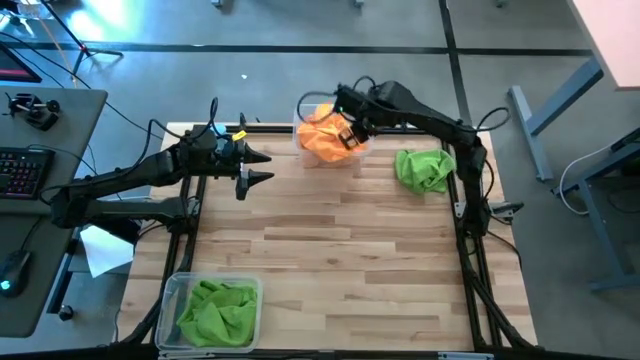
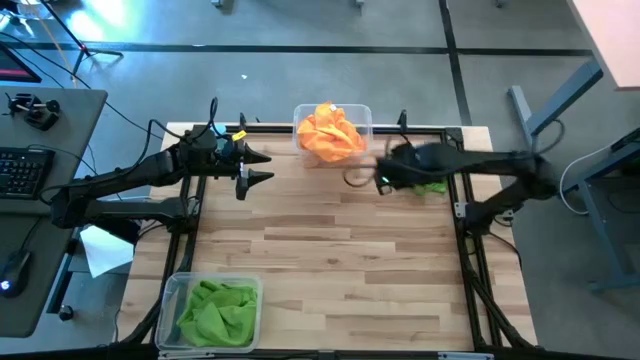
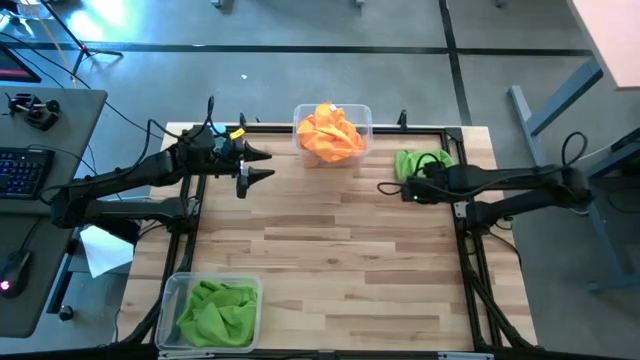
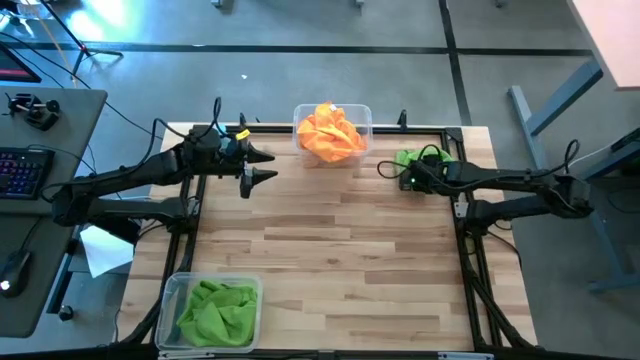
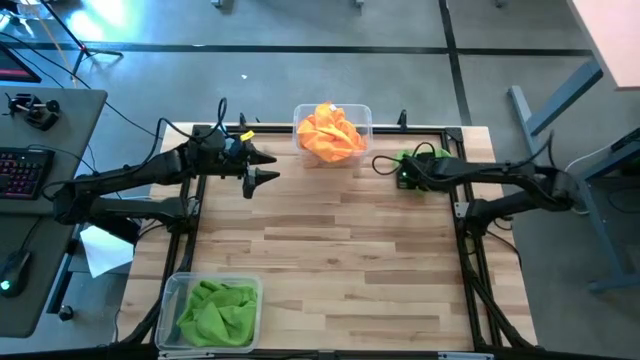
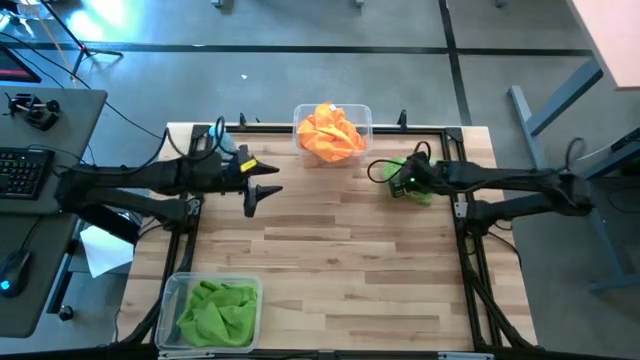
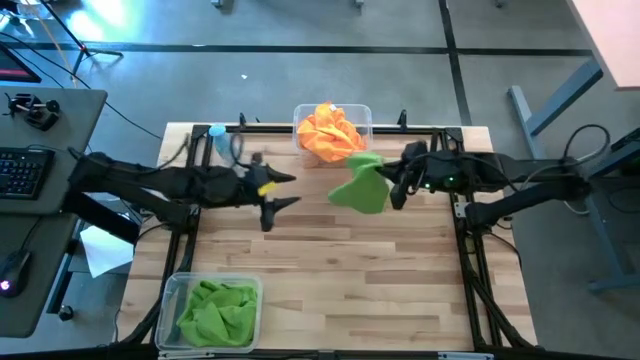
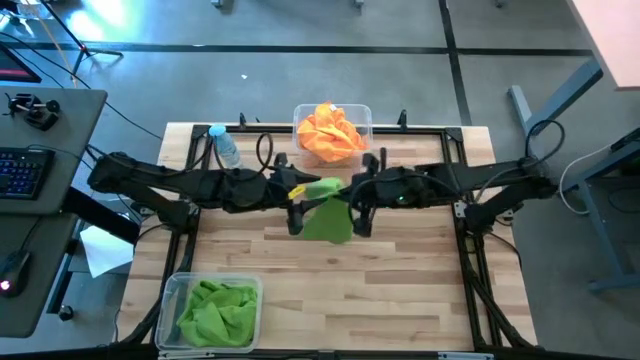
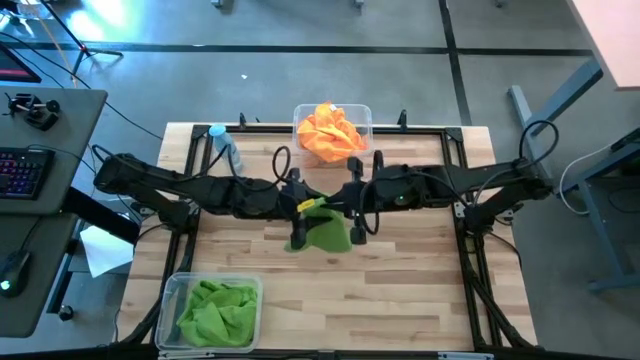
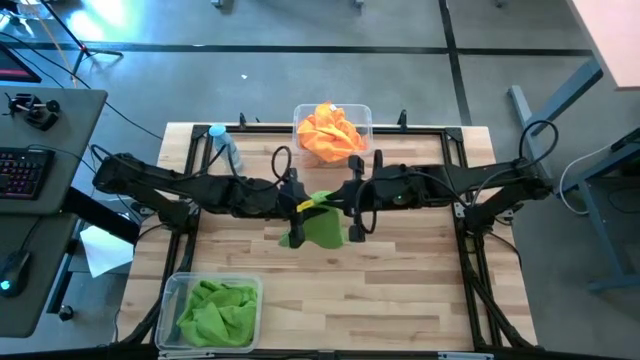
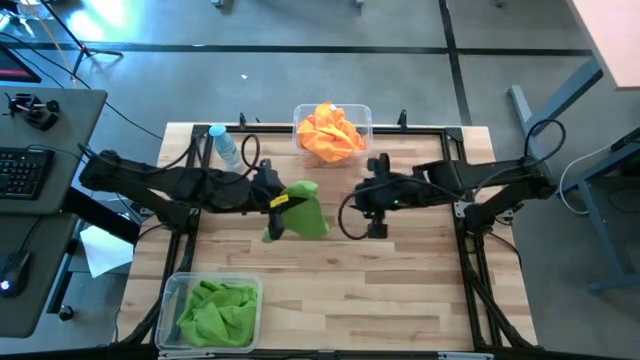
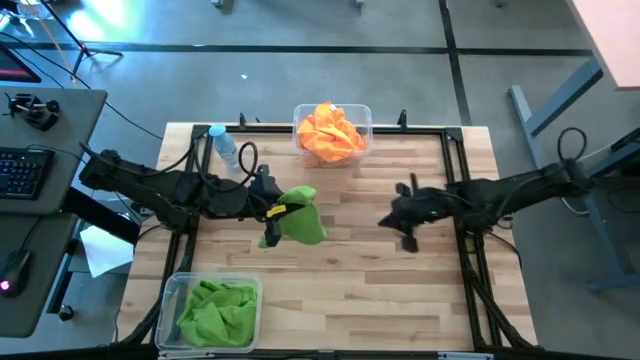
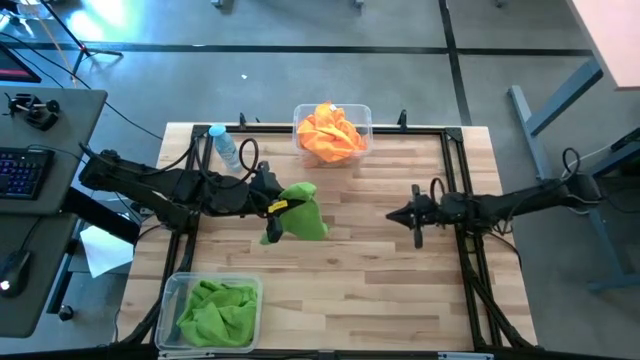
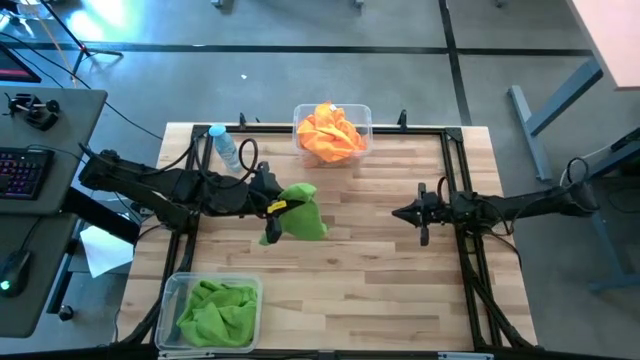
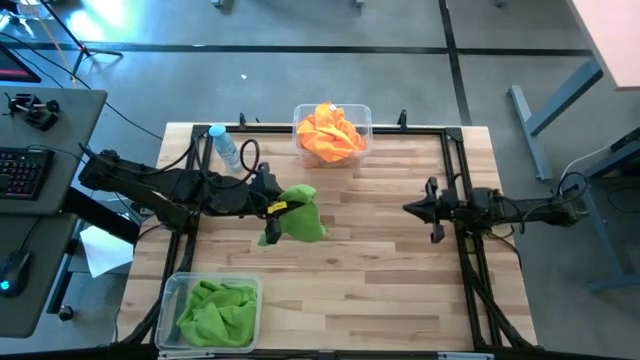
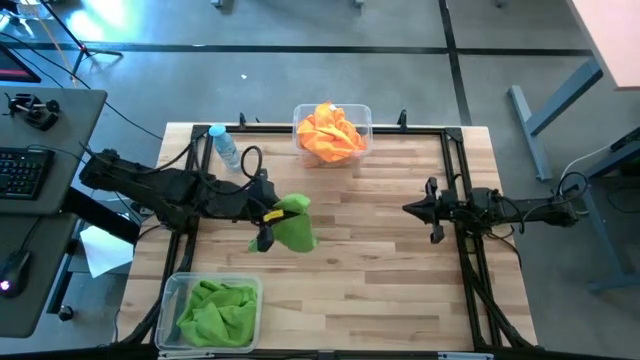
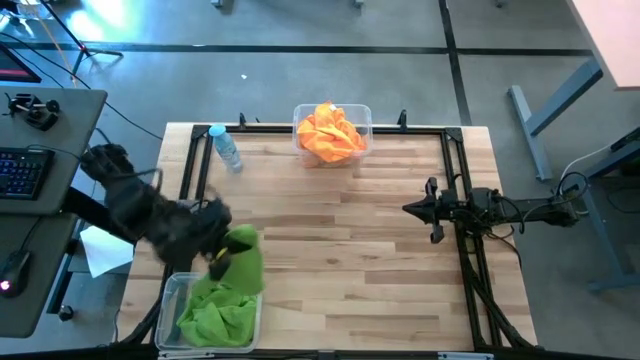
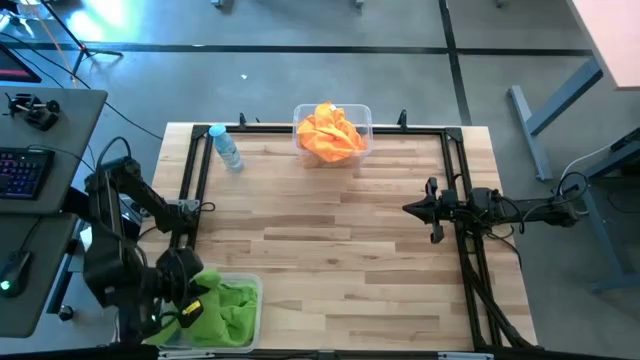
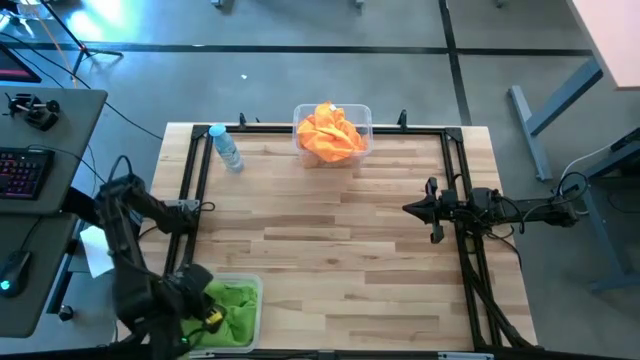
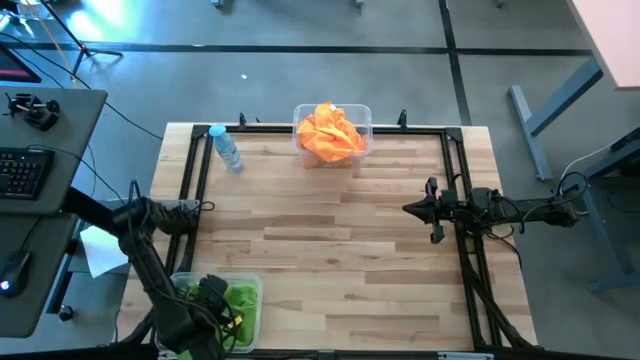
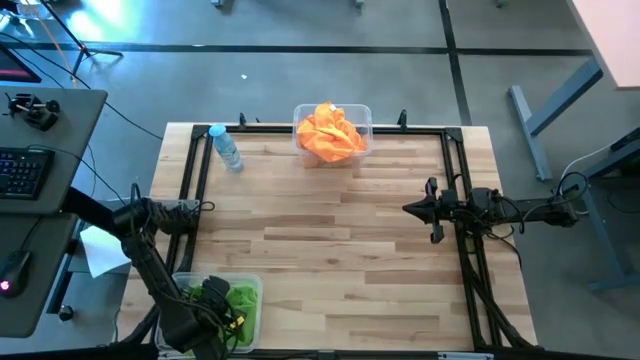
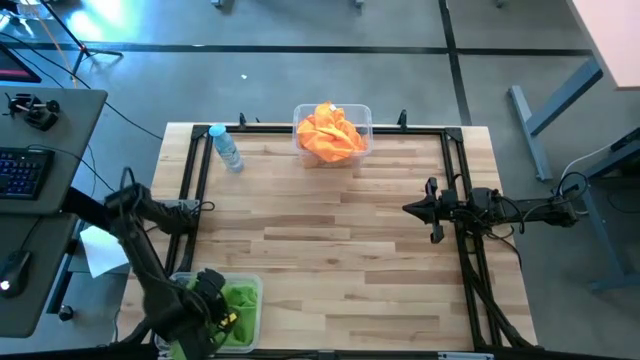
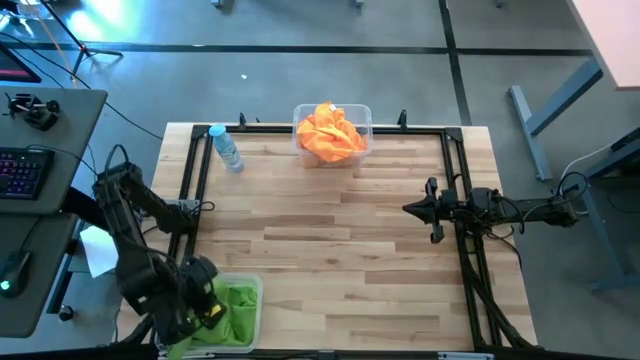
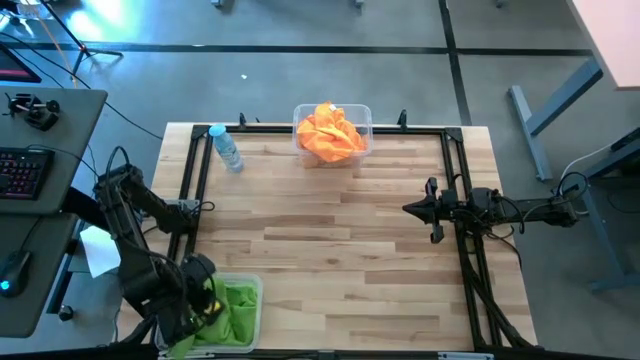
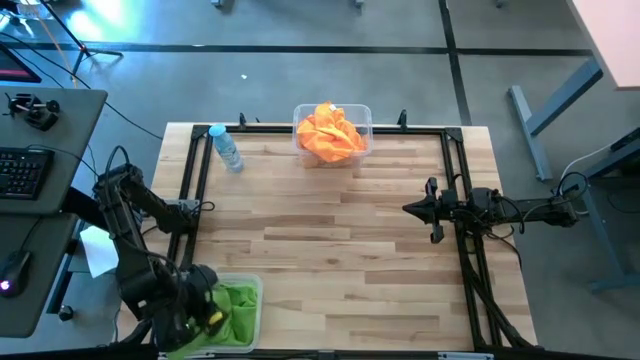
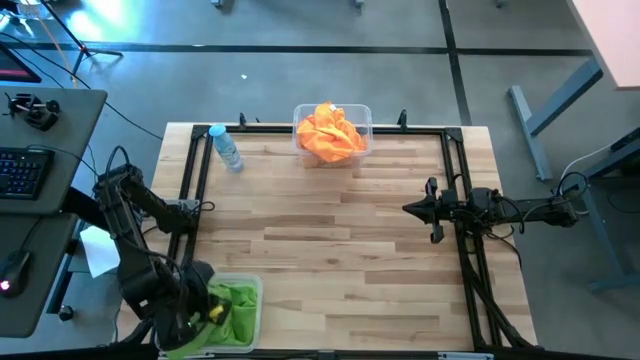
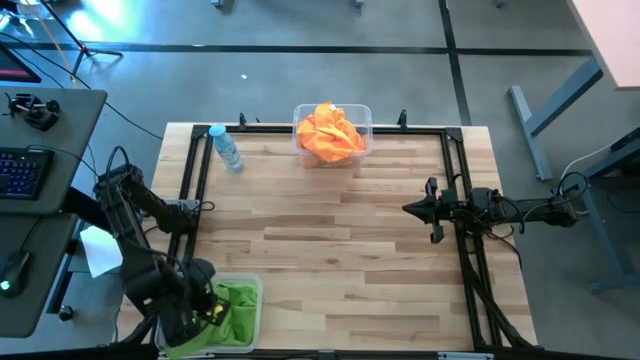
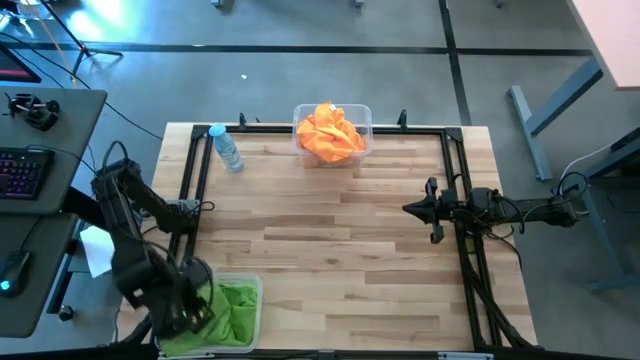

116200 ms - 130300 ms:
Task: Sort microfiber towel by color & place in baskets
Put the green towel into the bottom transparent bin

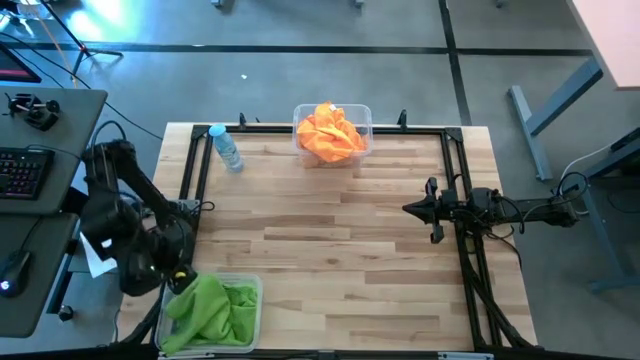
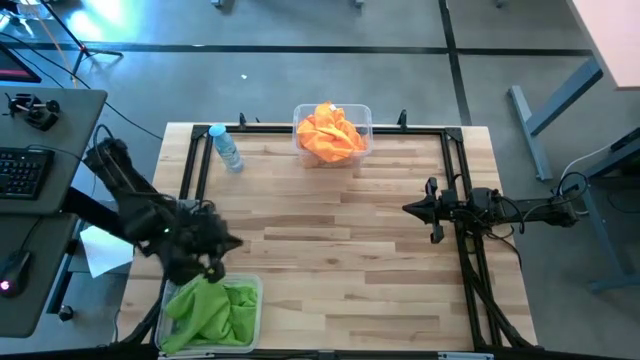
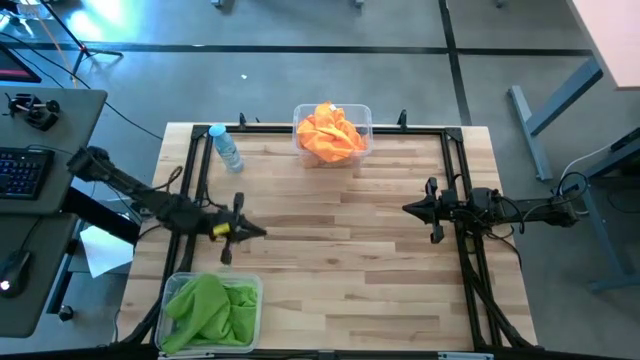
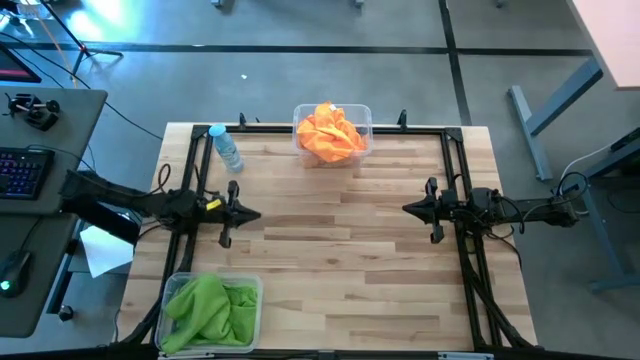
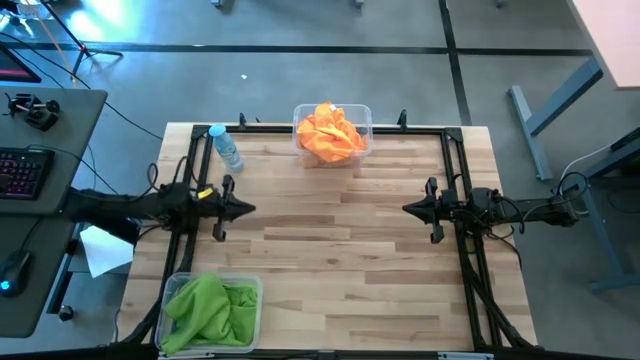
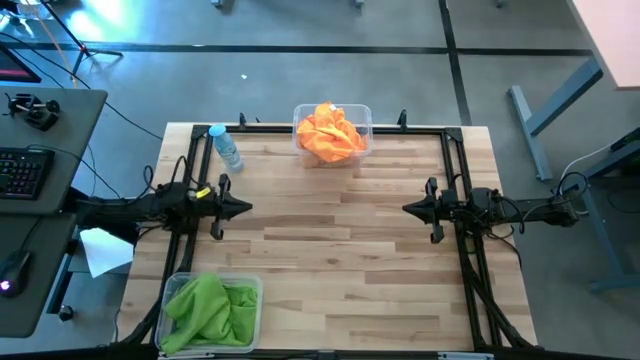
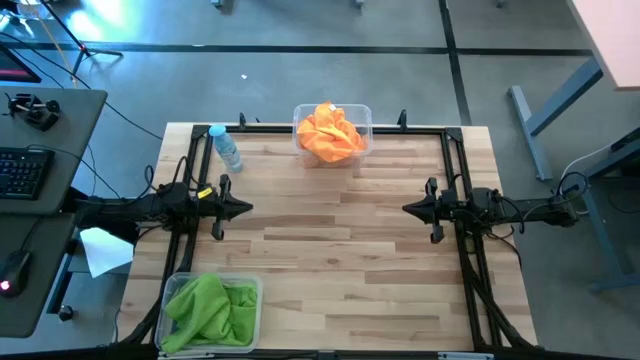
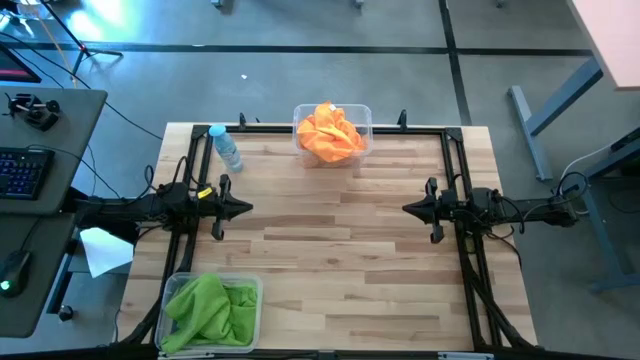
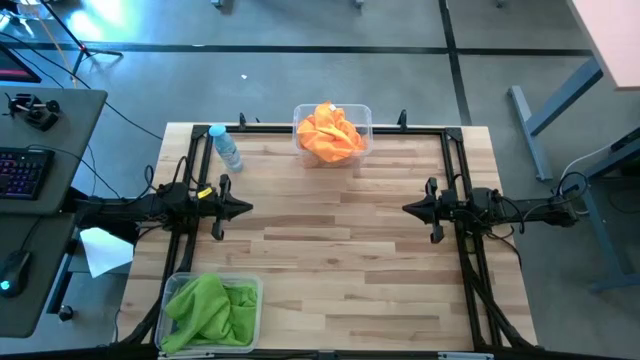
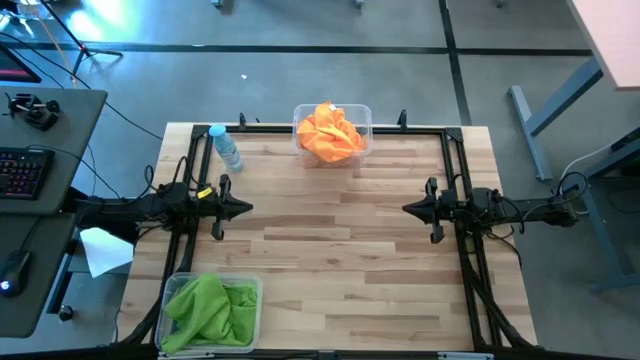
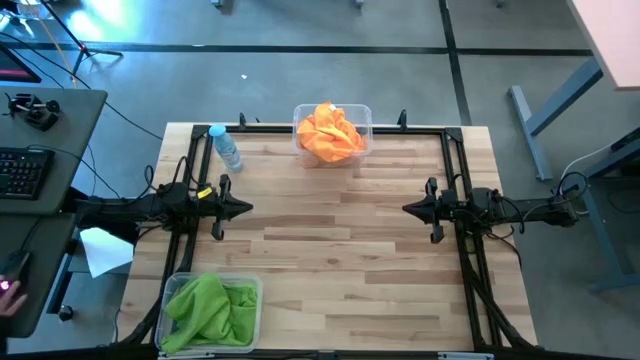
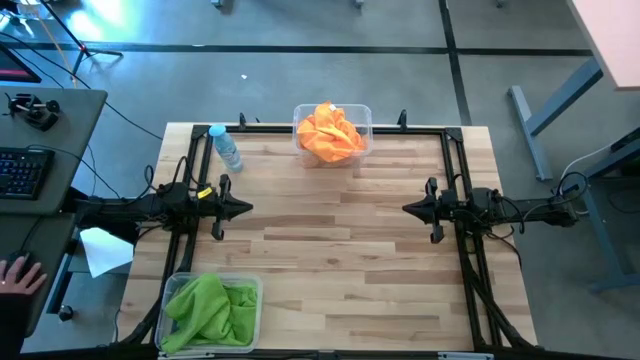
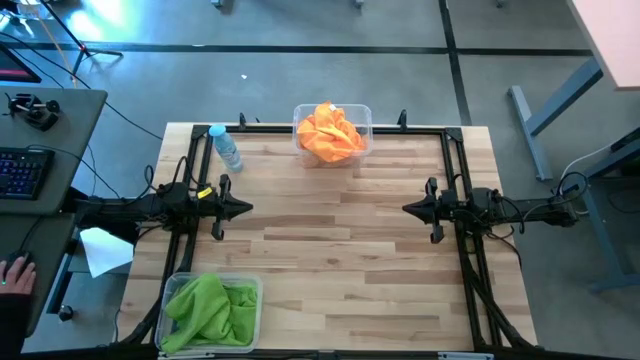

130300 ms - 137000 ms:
Return to Home Position
